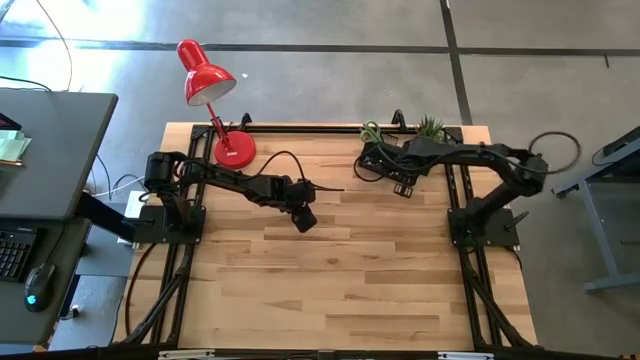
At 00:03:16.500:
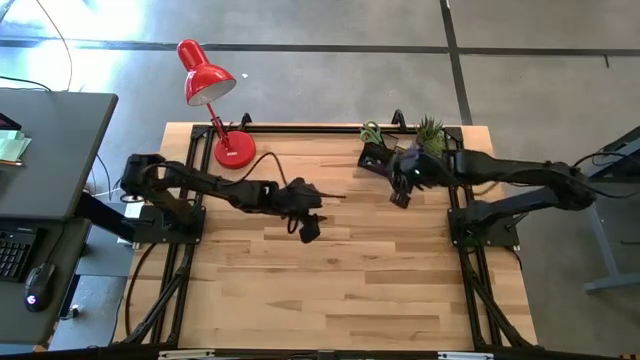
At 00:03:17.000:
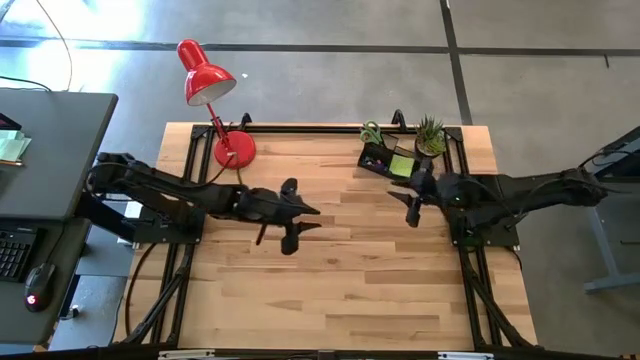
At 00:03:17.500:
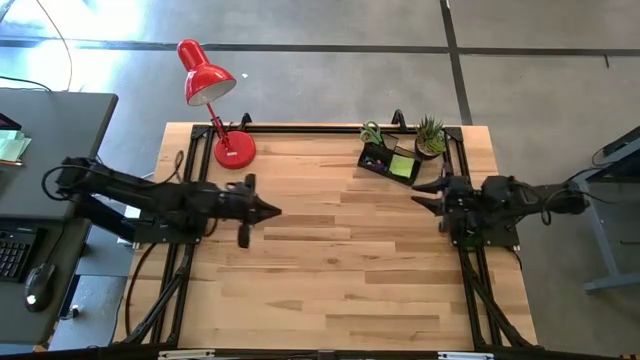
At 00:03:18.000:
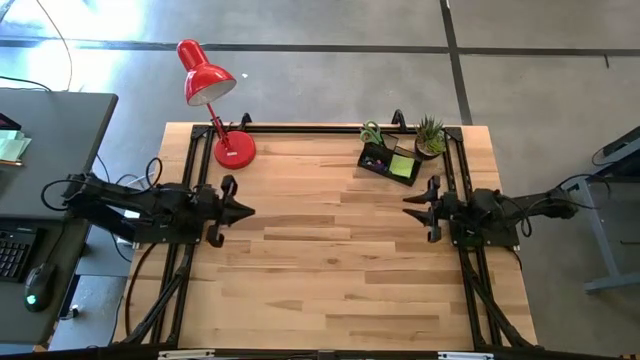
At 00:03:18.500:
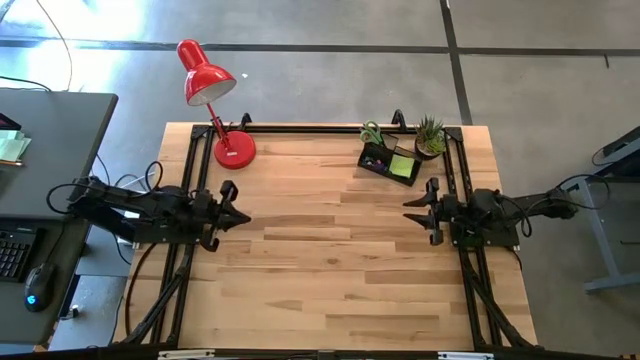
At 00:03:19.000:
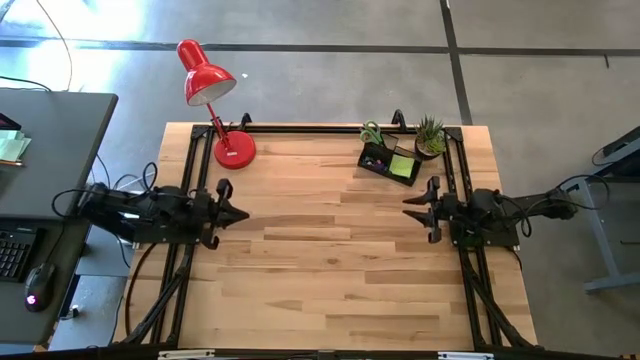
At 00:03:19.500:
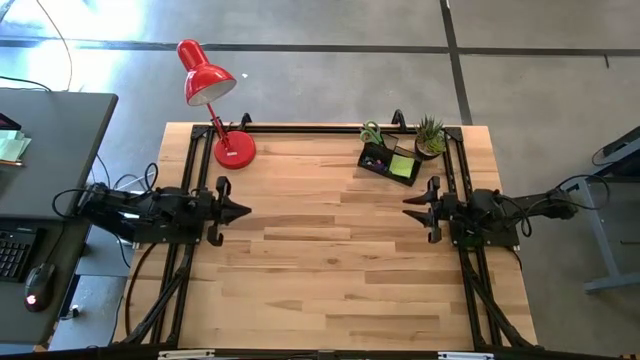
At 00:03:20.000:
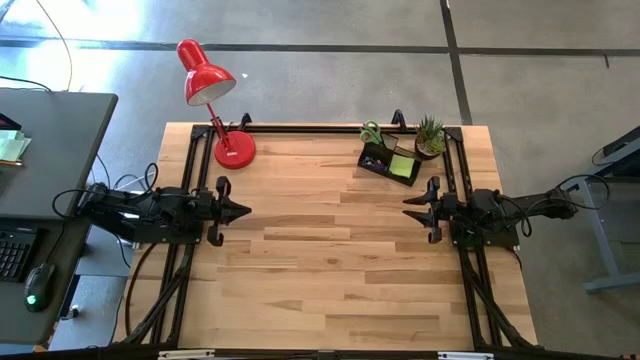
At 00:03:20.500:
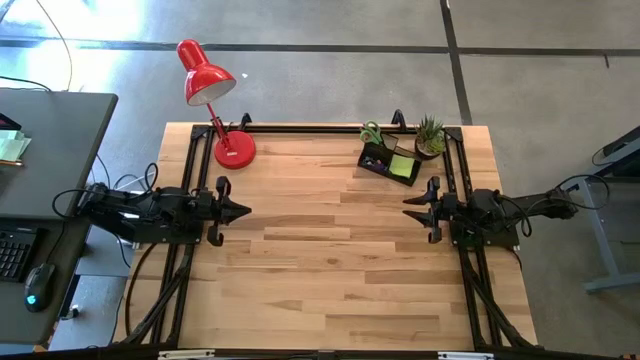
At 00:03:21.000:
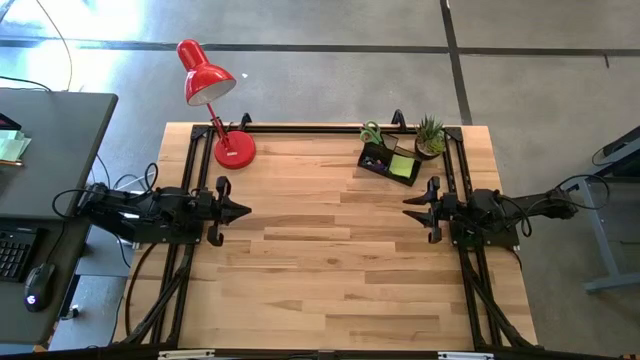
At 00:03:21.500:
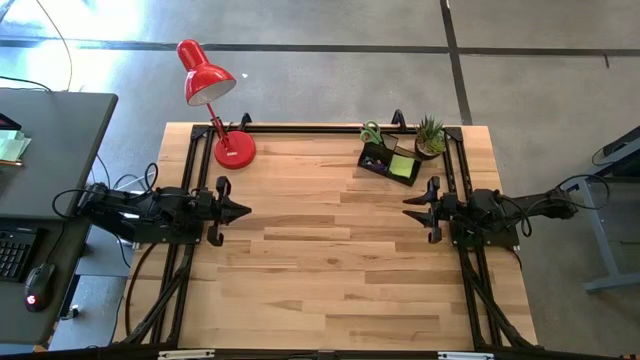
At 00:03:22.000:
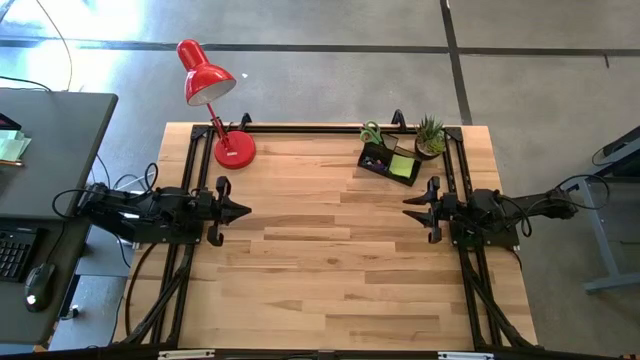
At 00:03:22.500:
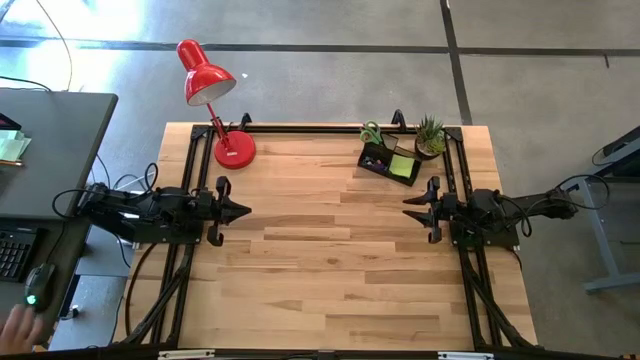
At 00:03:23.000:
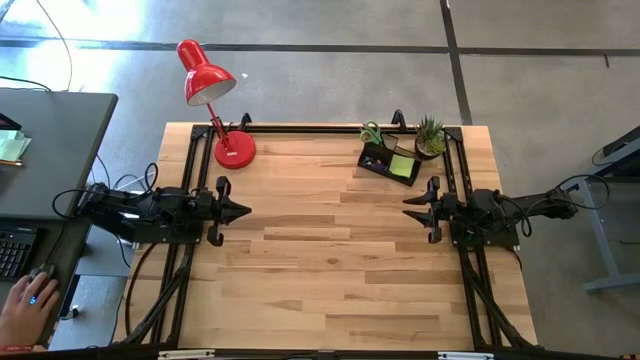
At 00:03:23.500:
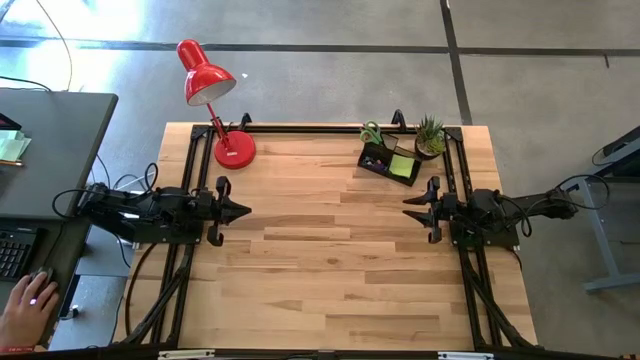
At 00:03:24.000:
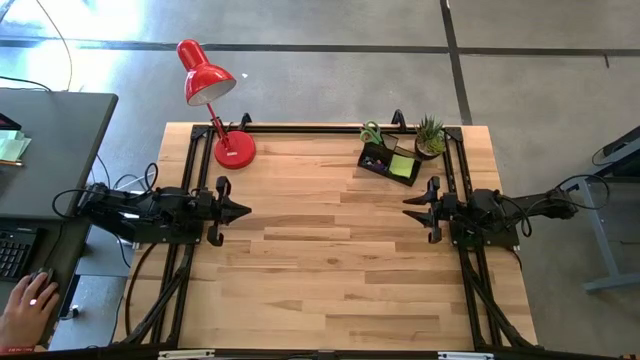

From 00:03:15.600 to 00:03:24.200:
Task: Pick and place office supplies into organizer
Return to Home Position

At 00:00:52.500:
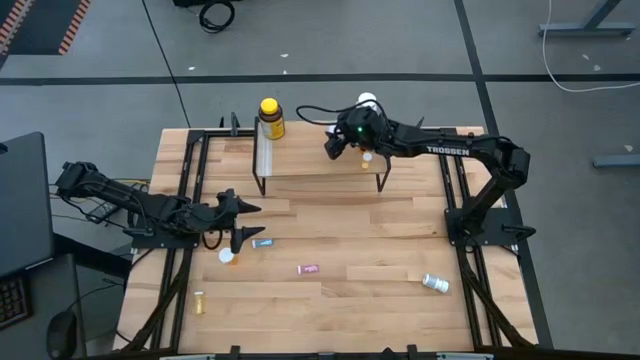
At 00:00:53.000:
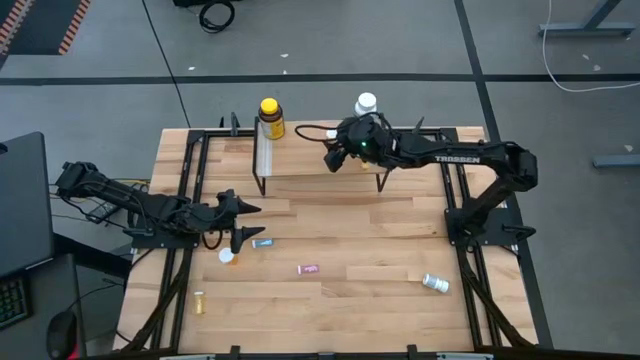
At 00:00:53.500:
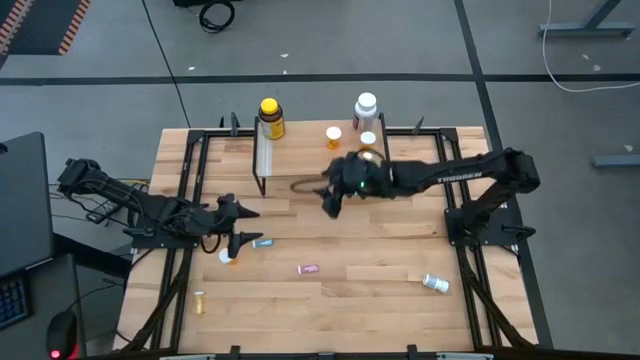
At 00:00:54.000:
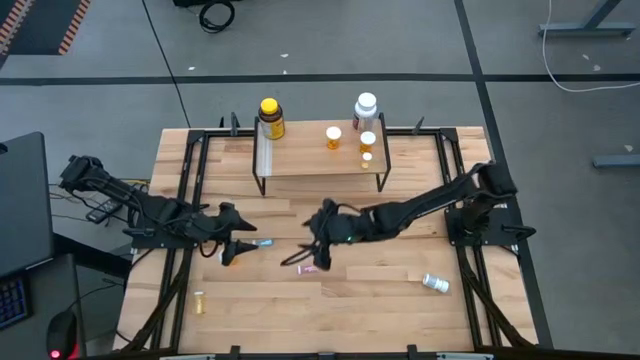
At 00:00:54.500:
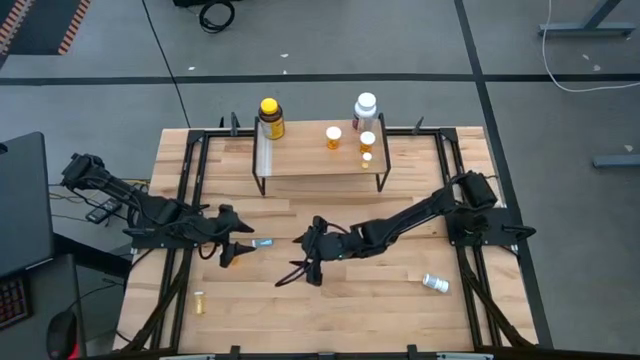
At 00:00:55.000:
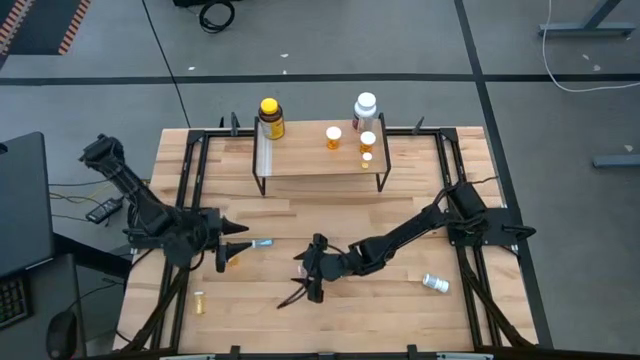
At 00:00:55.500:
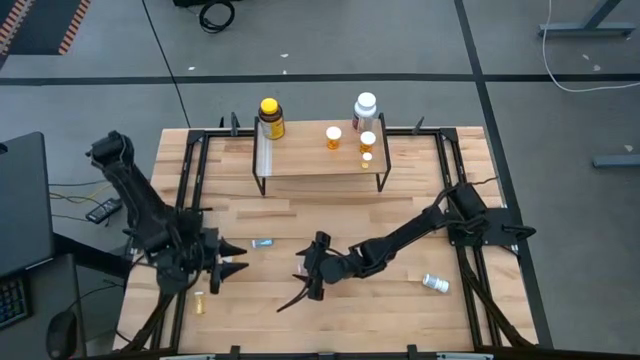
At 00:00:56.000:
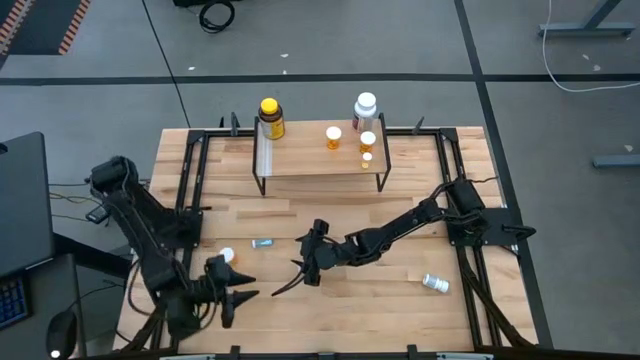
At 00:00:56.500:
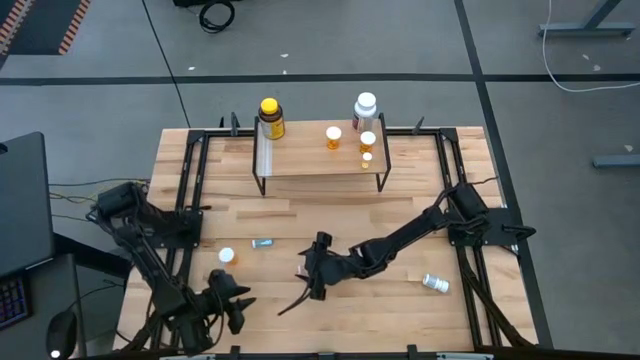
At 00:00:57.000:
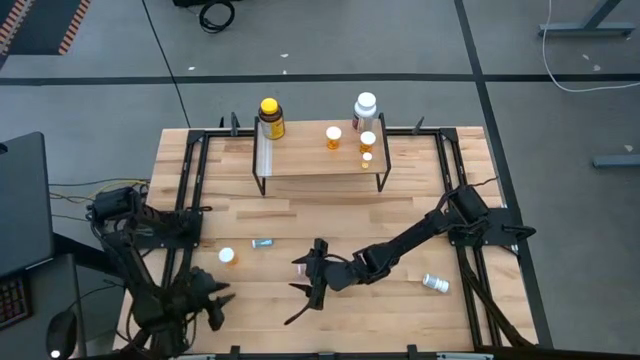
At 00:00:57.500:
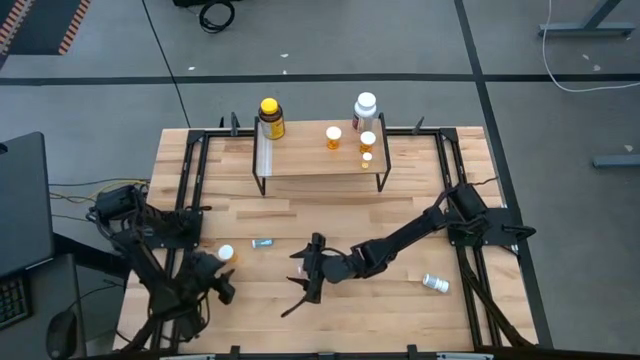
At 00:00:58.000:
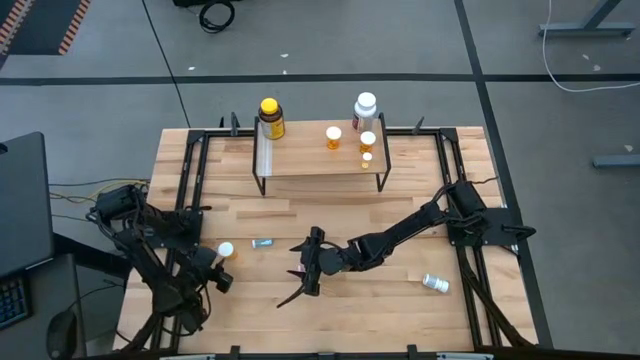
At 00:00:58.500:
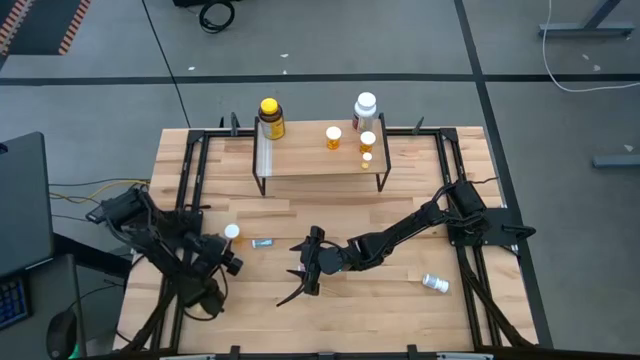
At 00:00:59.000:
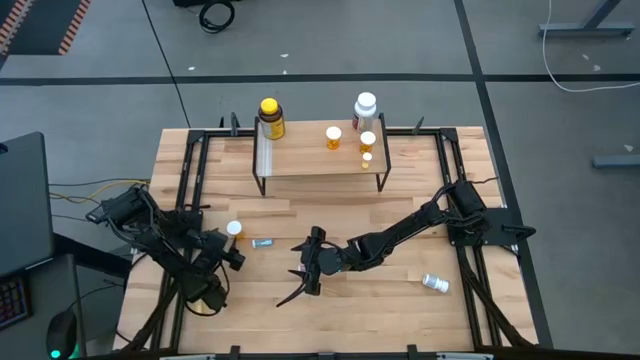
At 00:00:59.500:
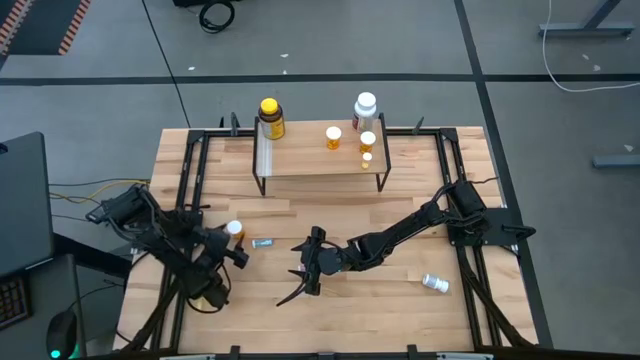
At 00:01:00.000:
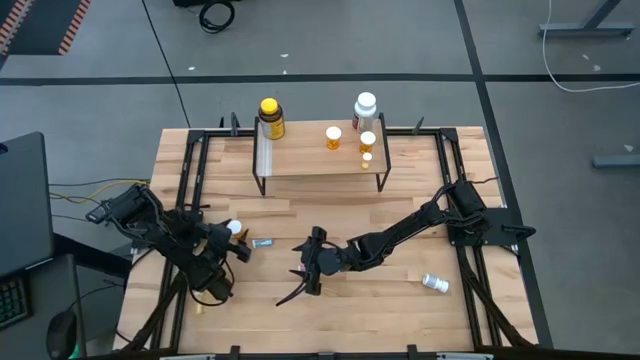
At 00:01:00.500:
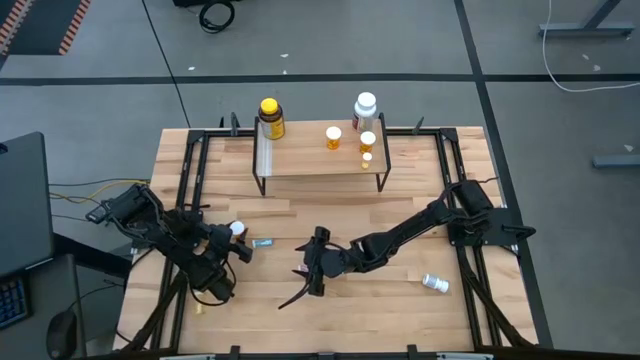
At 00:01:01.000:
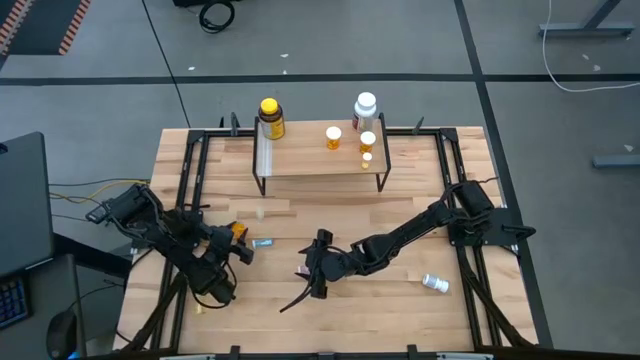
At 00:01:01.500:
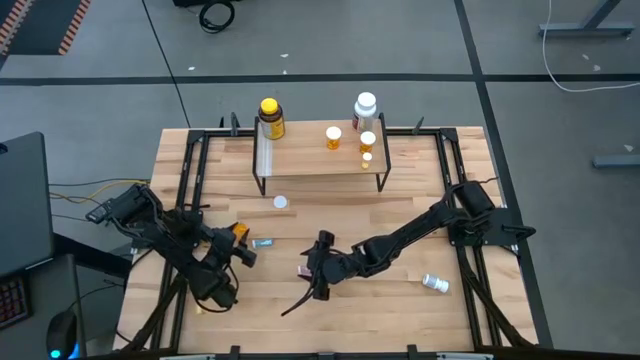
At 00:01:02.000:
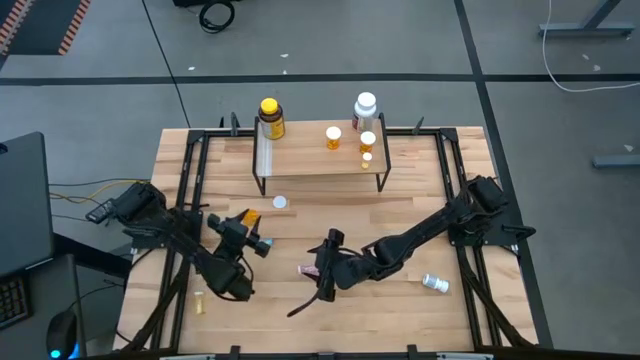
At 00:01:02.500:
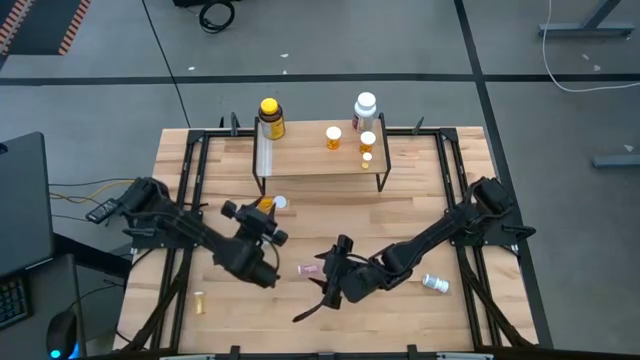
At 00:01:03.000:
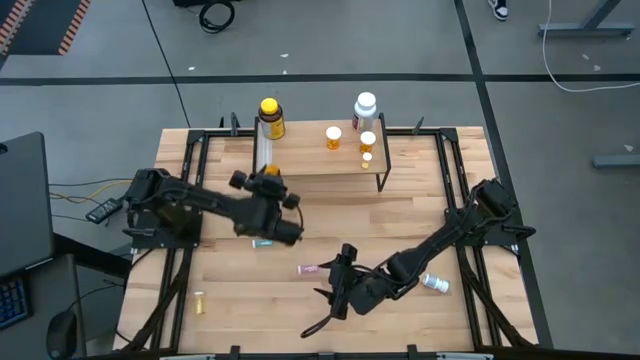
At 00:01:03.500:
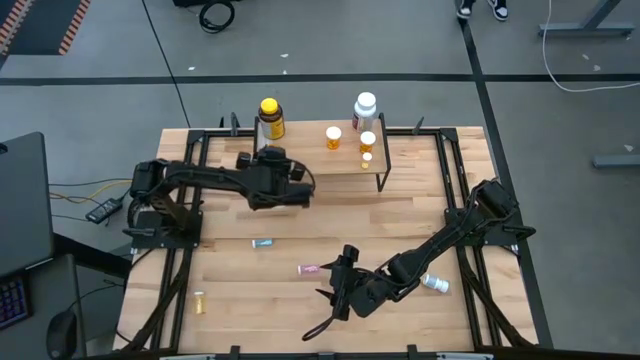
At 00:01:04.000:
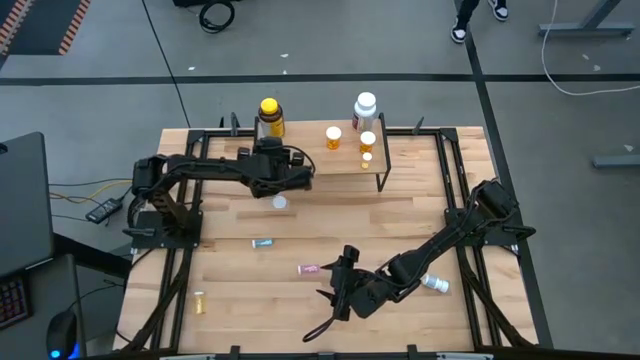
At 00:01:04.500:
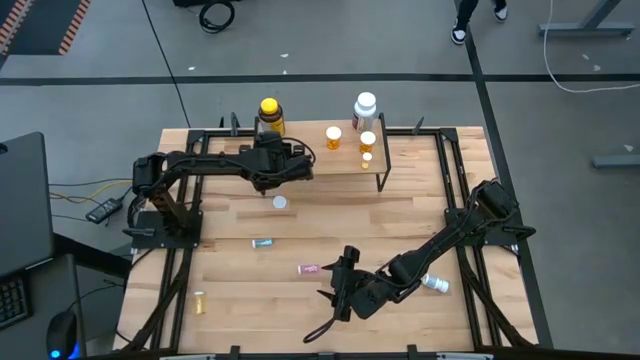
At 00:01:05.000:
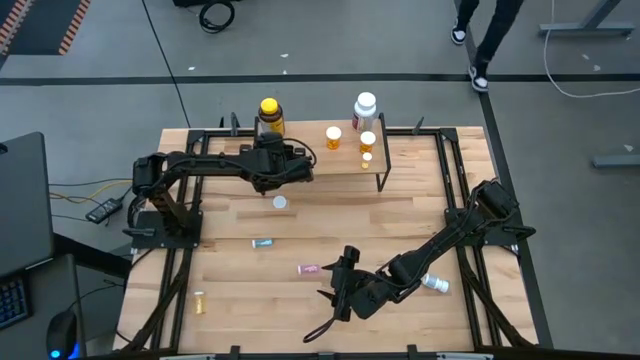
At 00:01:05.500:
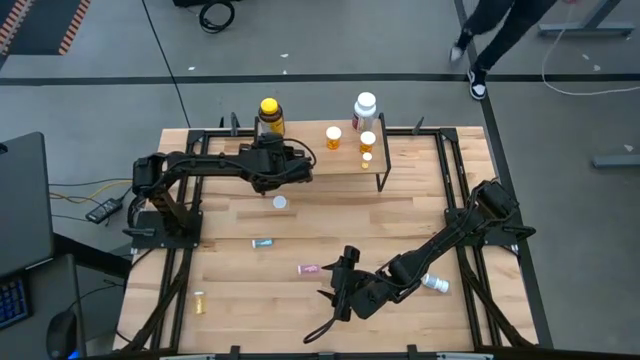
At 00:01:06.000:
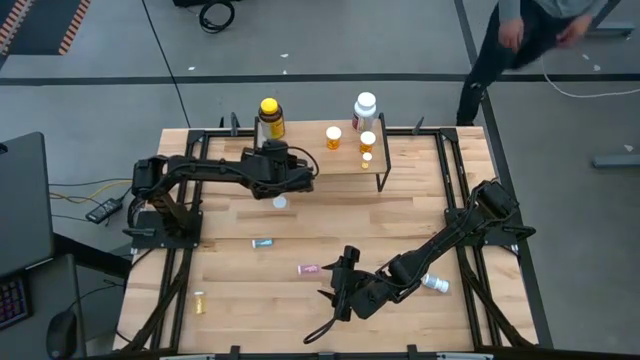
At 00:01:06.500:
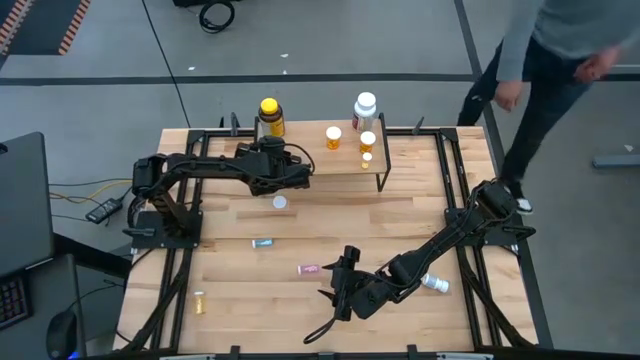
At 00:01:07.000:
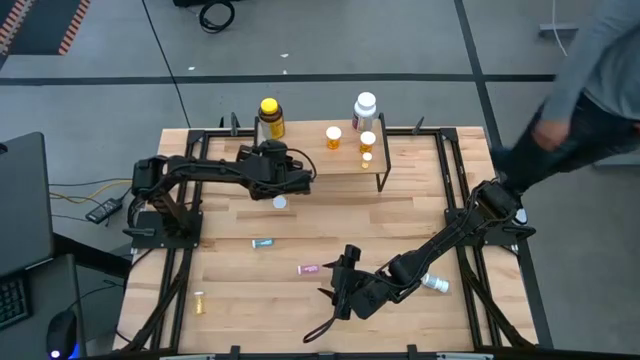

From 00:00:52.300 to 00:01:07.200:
Task: Pick and place medicine bottles onto shelf by color
Put the large orange pill bottle on the shelf
